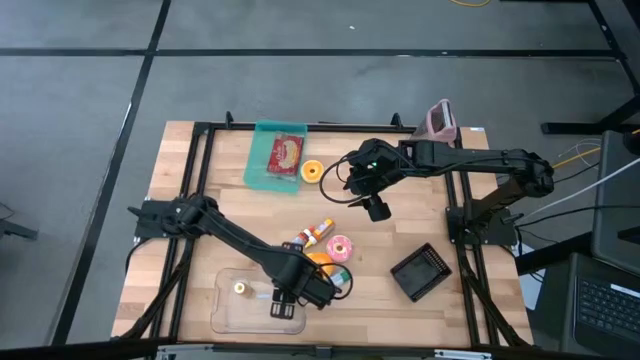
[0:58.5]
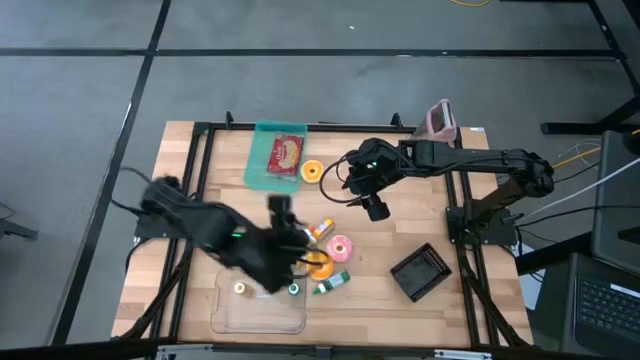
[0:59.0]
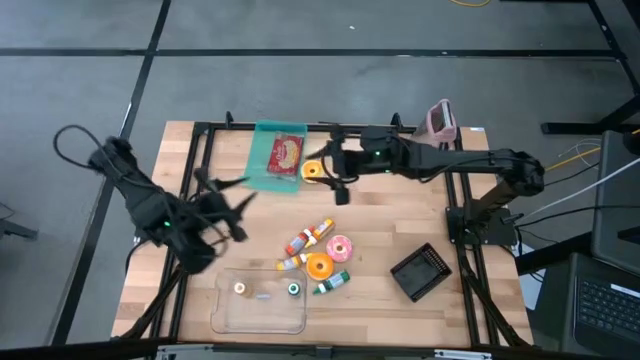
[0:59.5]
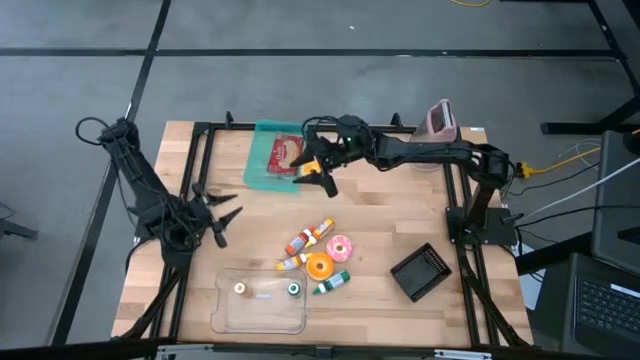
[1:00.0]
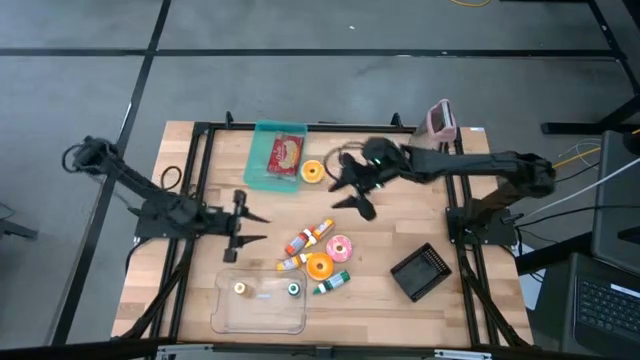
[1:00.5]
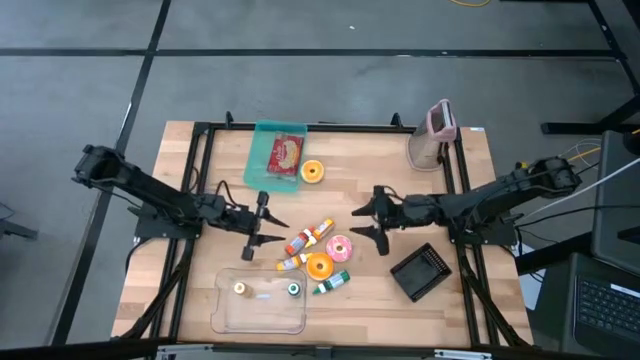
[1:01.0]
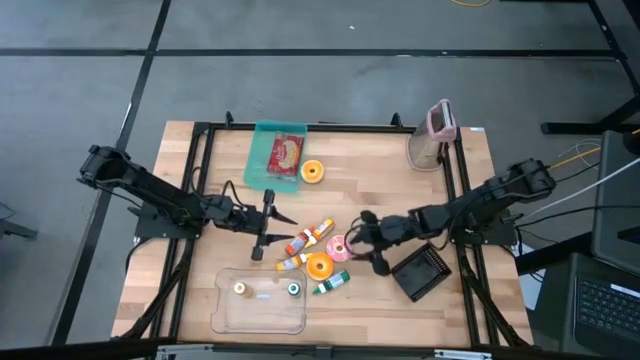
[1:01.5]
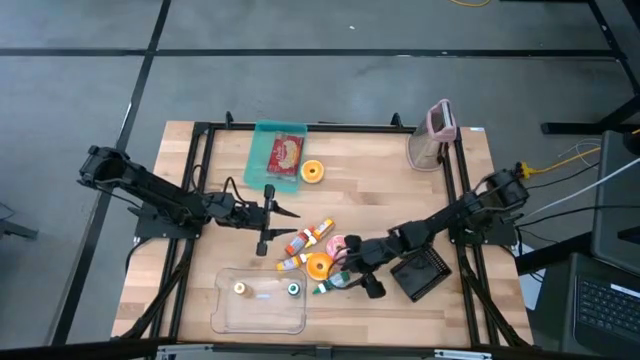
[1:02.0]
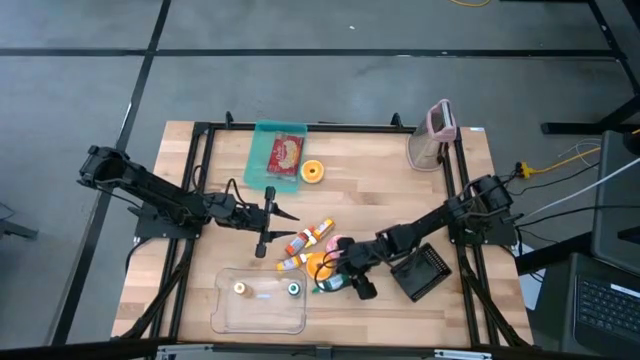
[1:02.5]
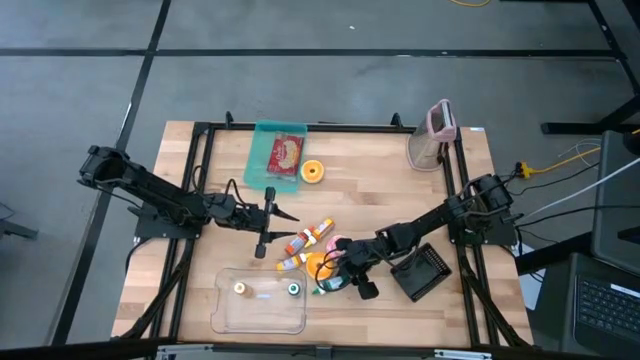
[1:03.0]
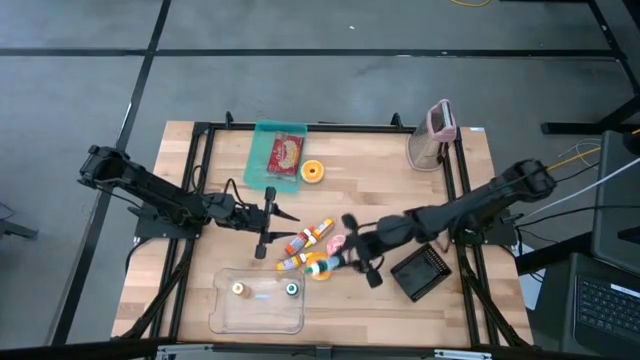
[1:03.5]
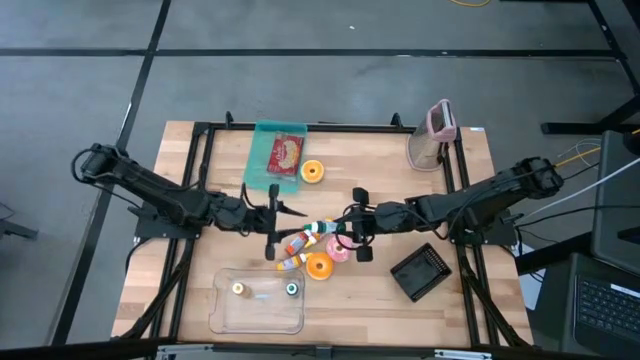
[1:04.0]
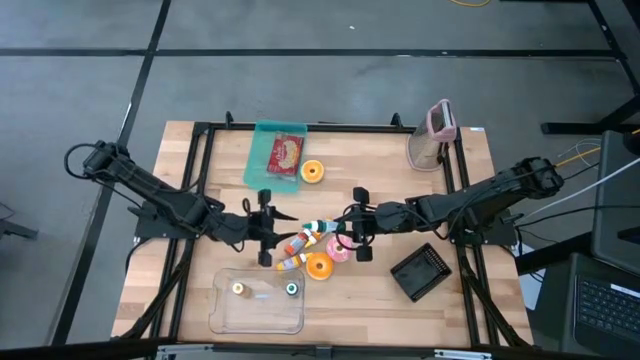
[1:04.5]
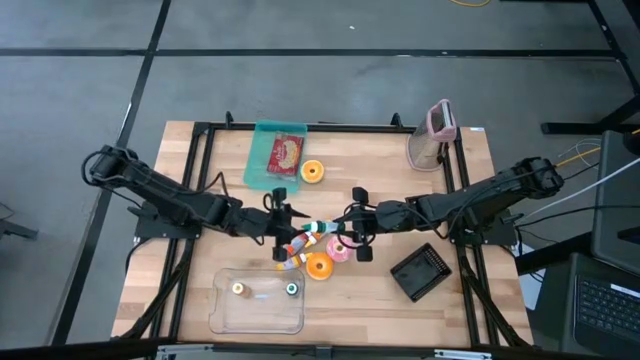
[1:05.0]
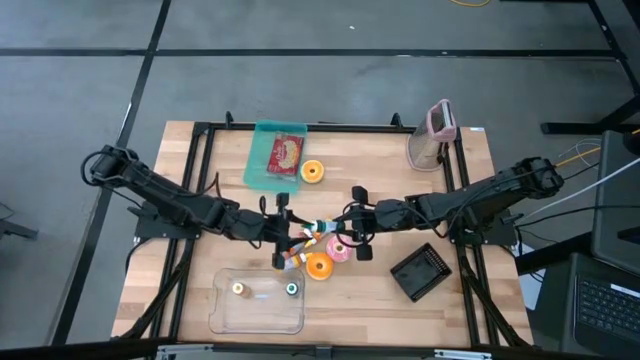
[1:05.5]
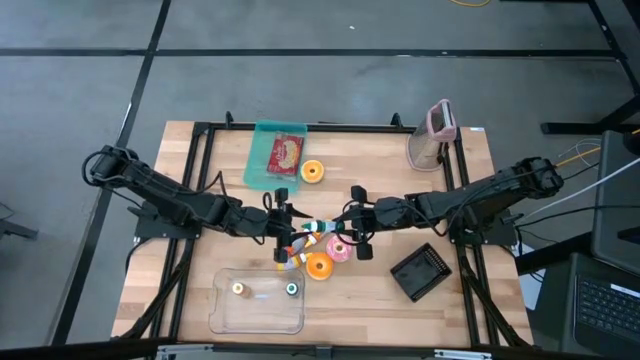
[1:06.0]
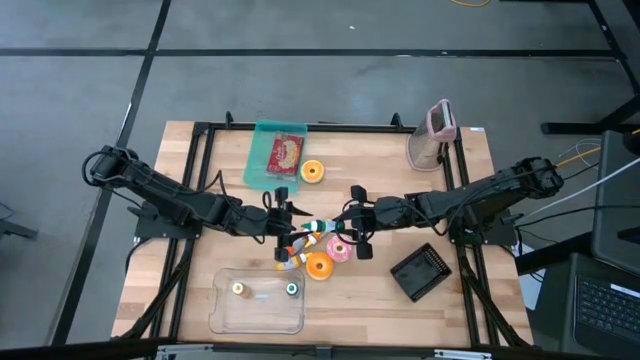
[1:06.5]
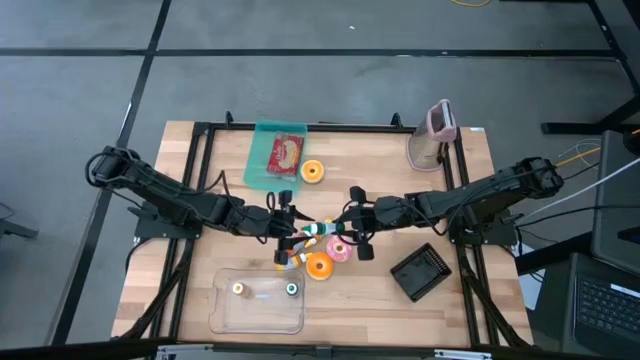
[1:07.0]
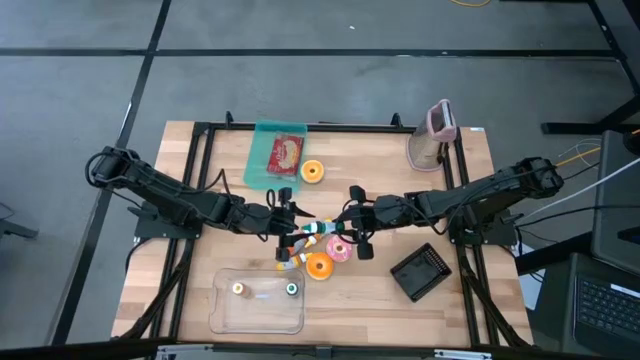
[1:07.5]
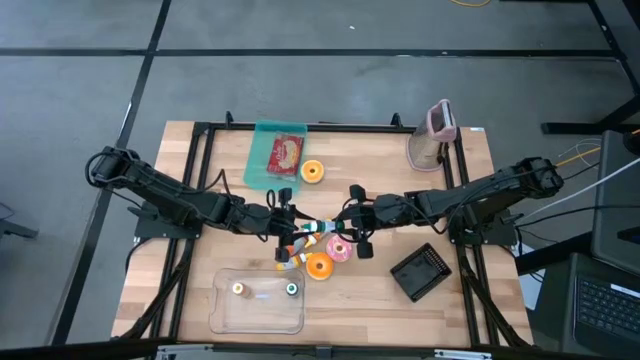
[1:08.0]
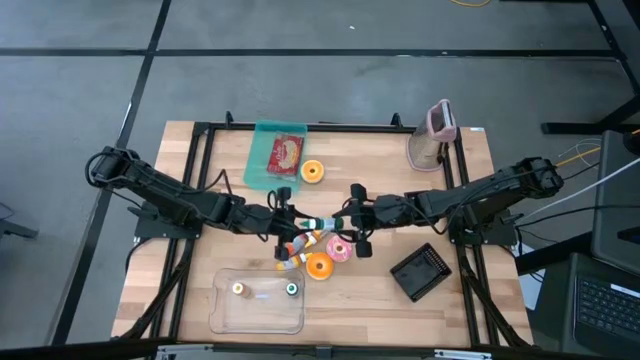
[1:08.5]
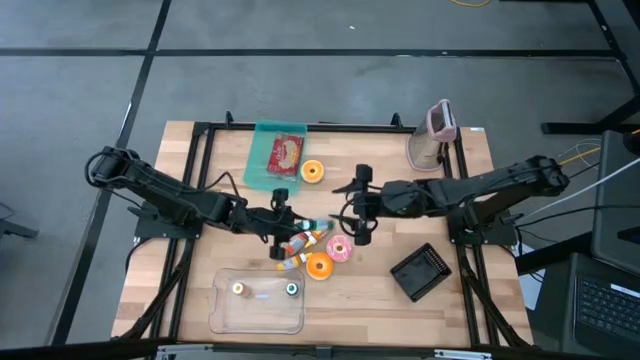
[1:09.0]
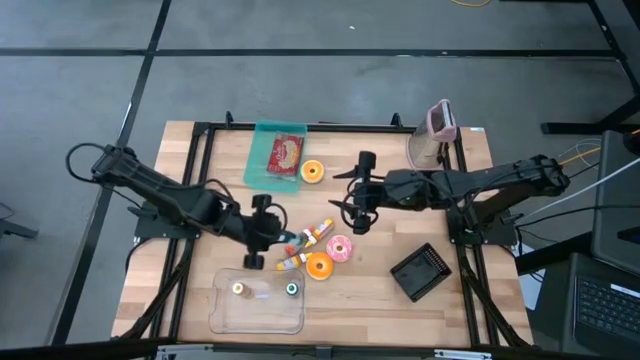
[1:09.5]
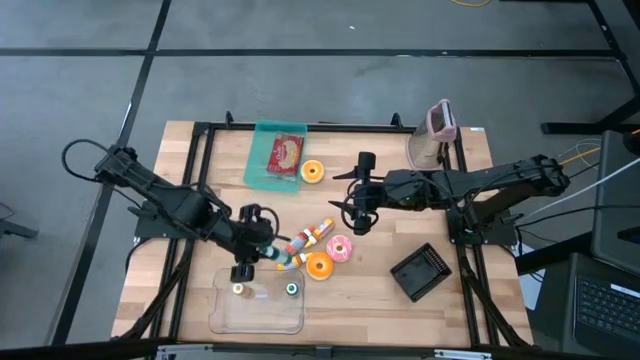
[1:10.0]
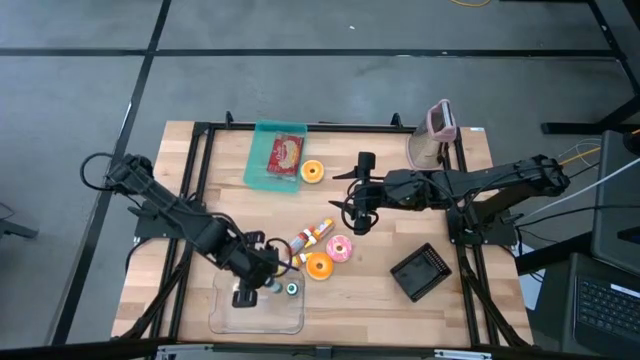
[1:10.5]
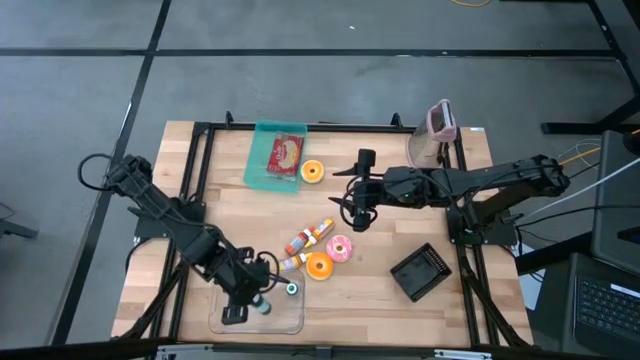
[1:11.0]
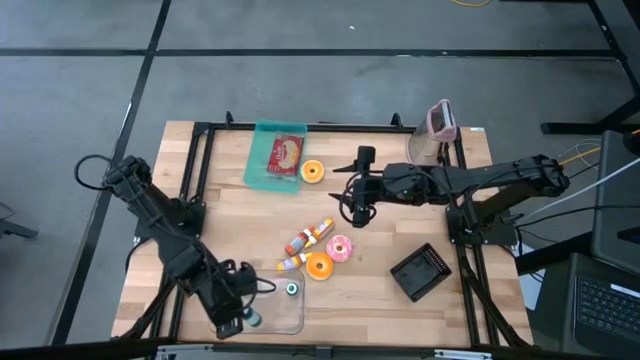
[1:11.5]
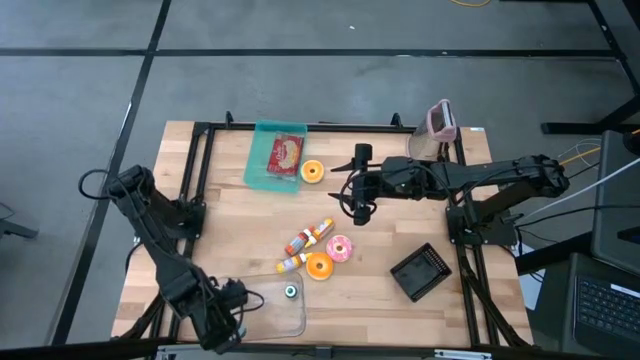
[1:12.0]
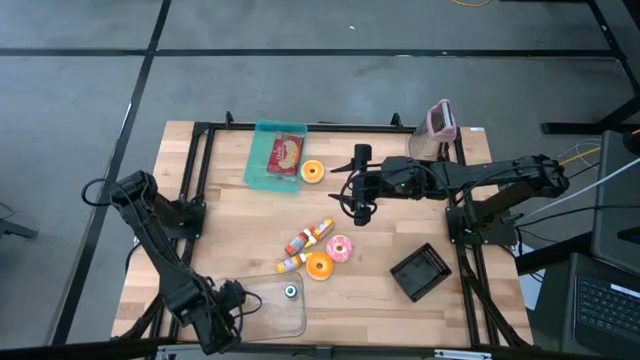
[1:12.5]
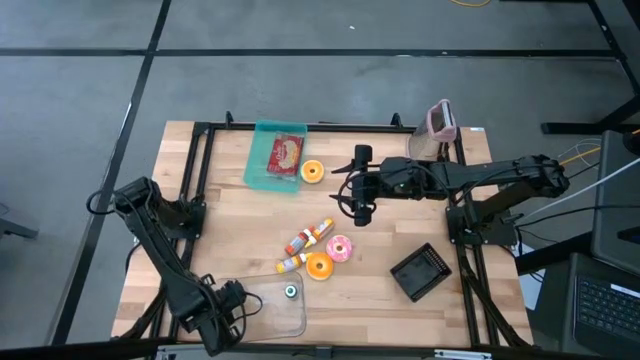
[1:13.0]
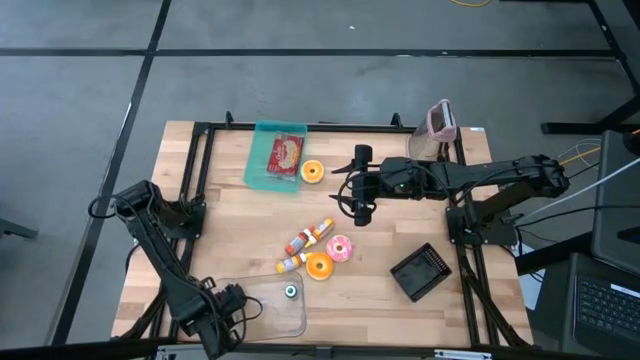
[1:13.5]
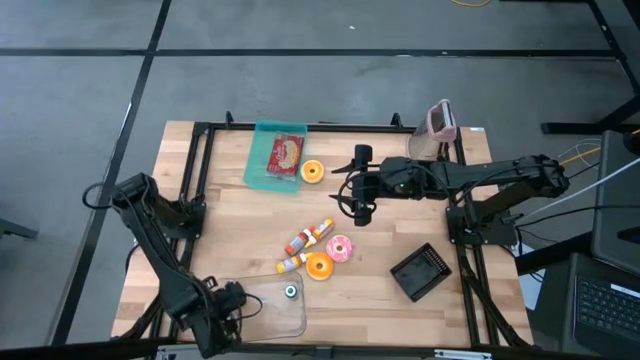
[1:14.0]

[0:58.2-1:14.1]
Put the green food coloring bottle into the transparent bin

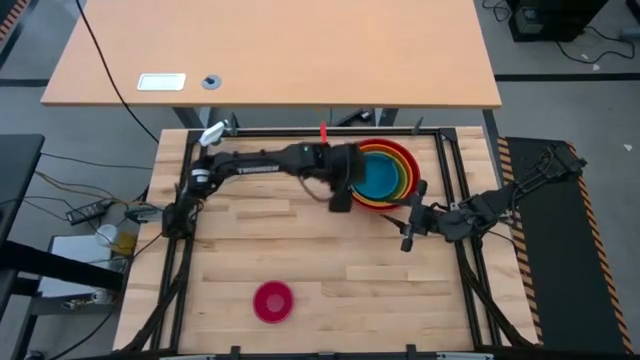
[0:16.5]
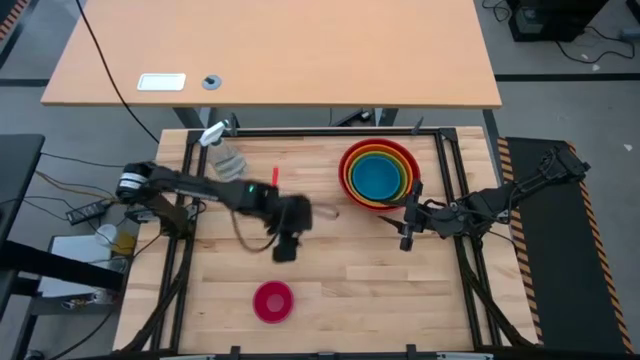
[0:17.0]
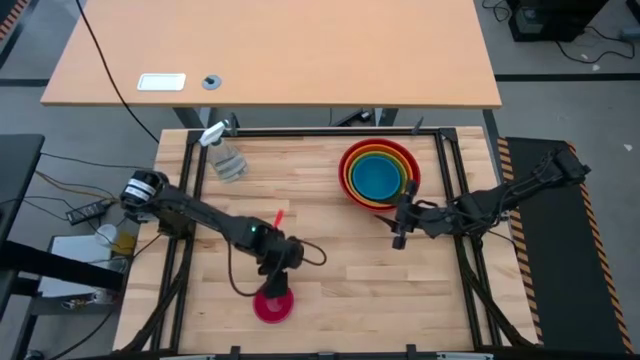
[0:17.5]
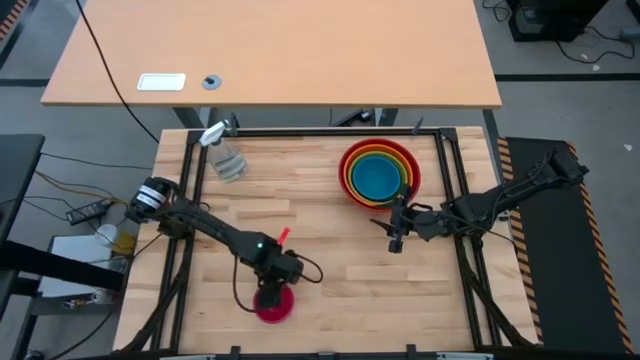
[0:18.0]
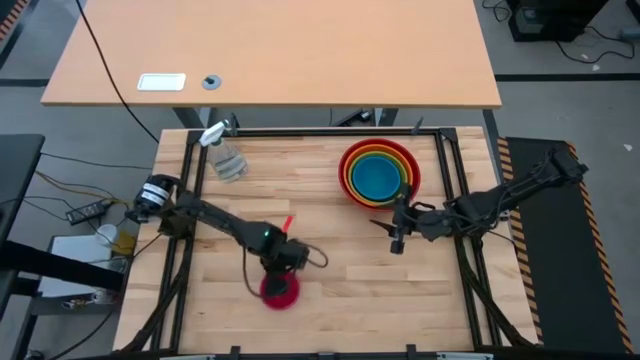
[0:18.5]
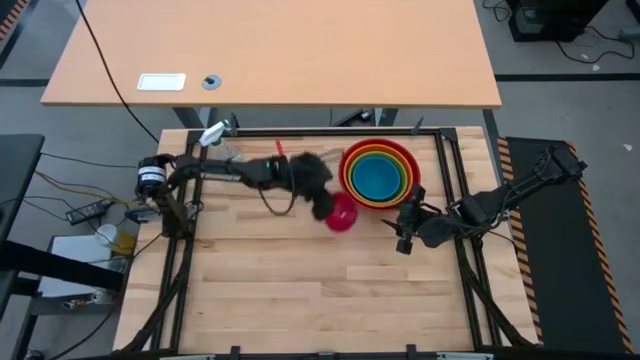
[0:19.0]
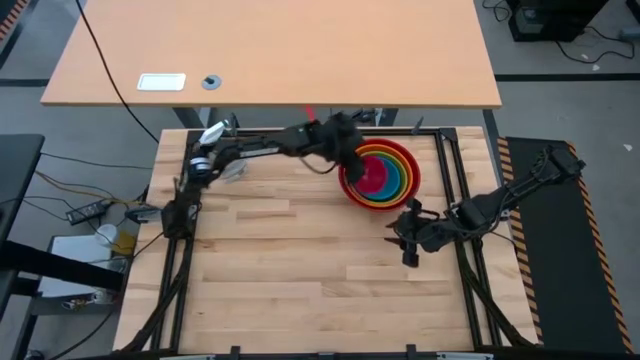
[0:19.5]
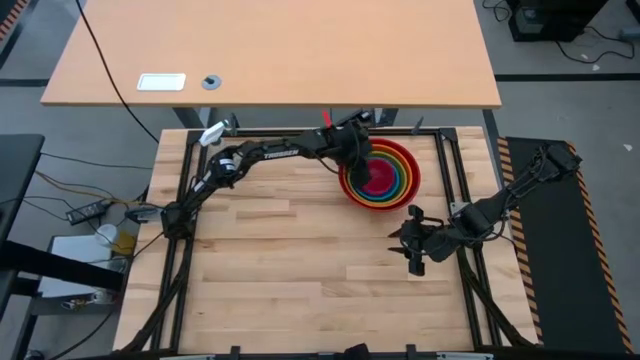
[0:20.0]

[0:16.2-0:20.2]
Stack the red bowl on top of the blue bowl
